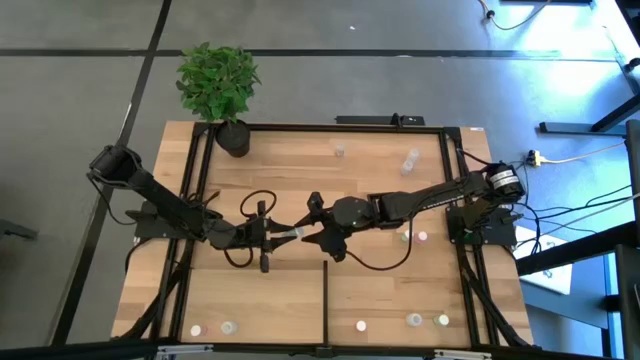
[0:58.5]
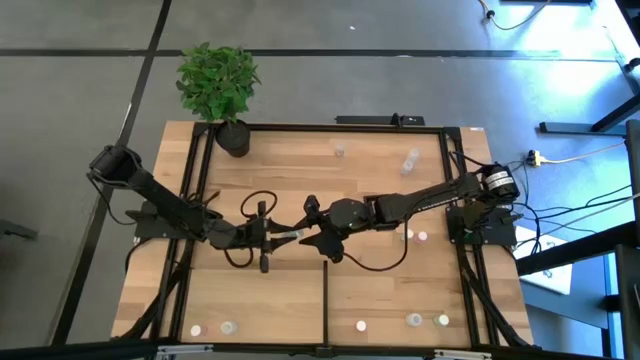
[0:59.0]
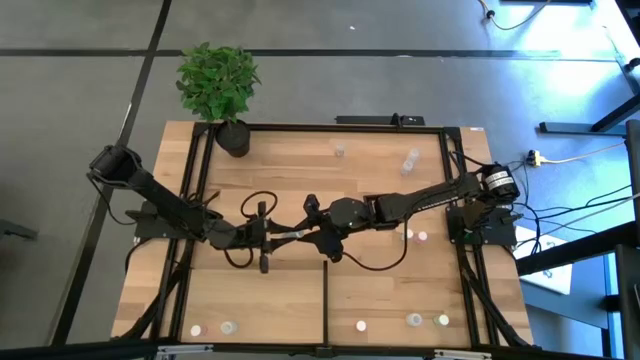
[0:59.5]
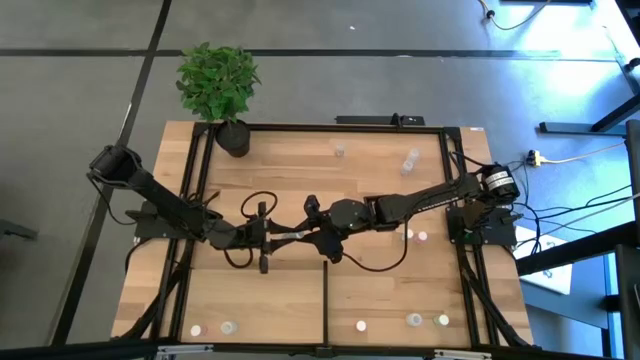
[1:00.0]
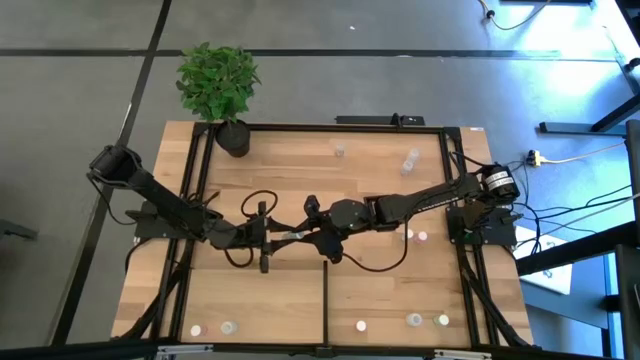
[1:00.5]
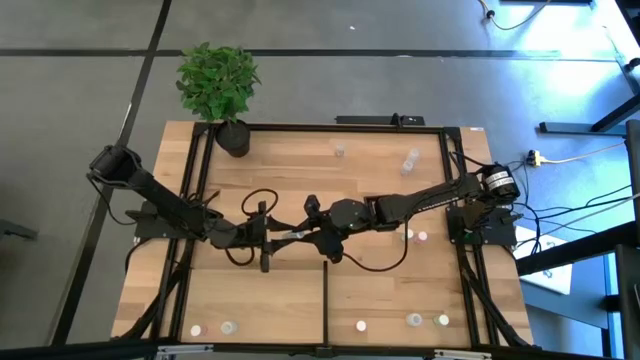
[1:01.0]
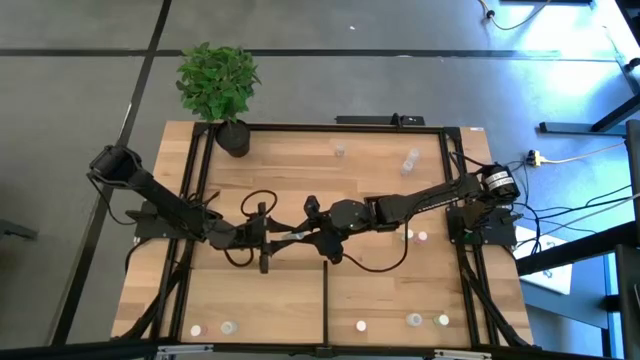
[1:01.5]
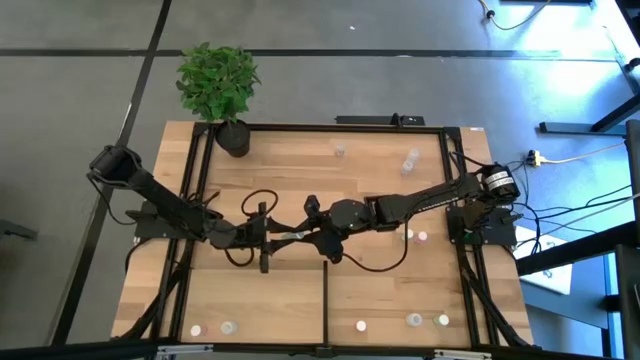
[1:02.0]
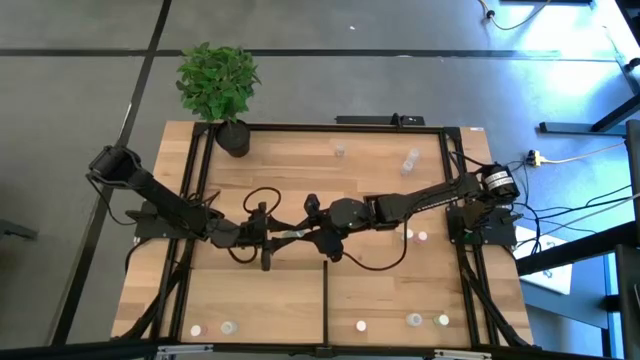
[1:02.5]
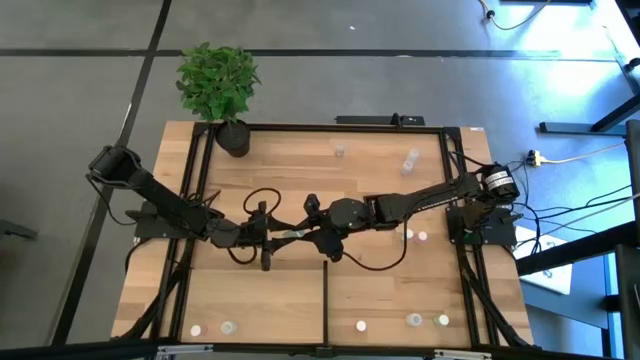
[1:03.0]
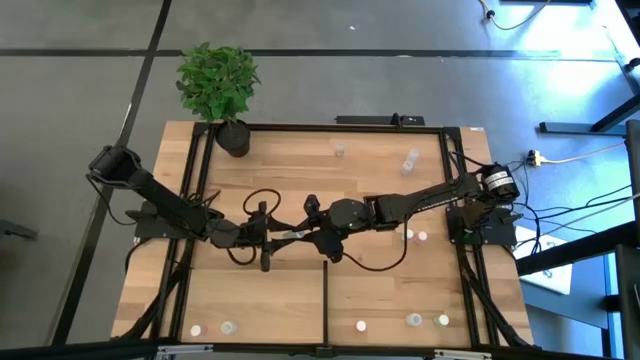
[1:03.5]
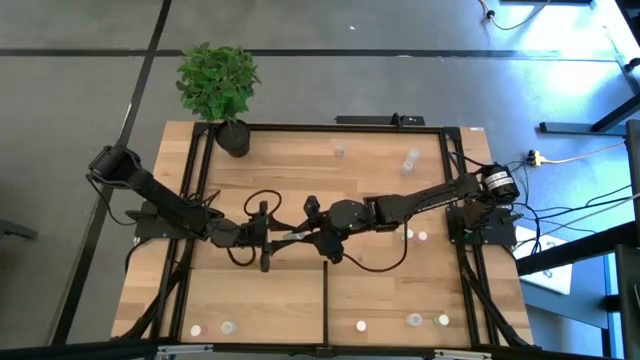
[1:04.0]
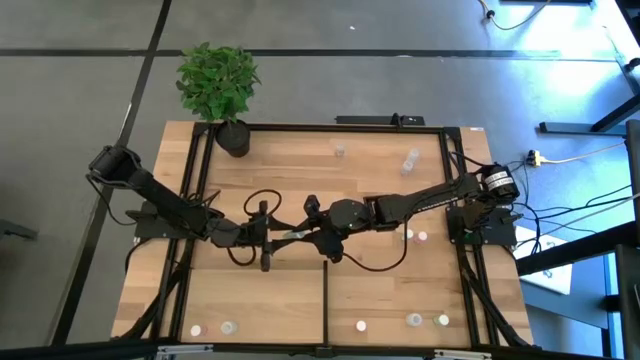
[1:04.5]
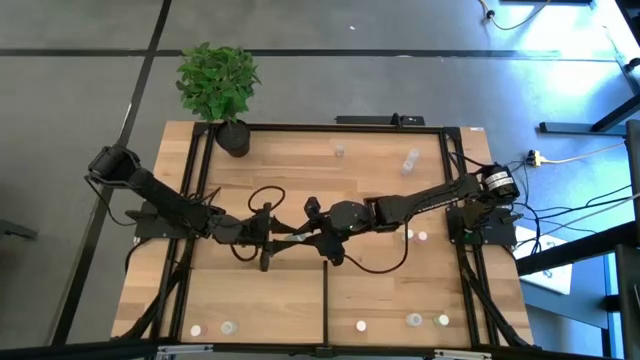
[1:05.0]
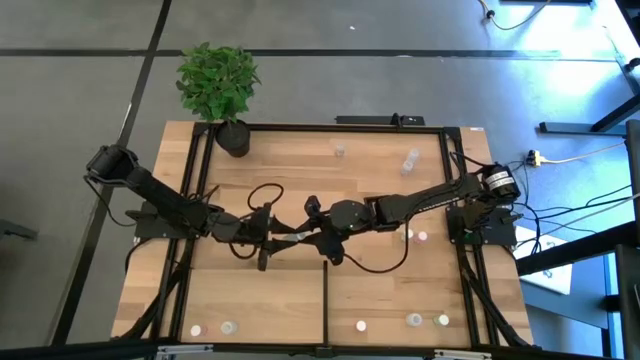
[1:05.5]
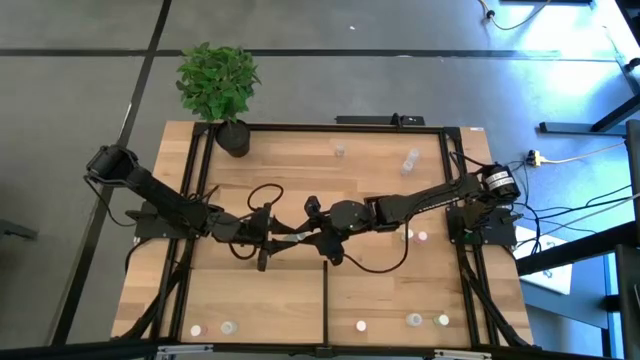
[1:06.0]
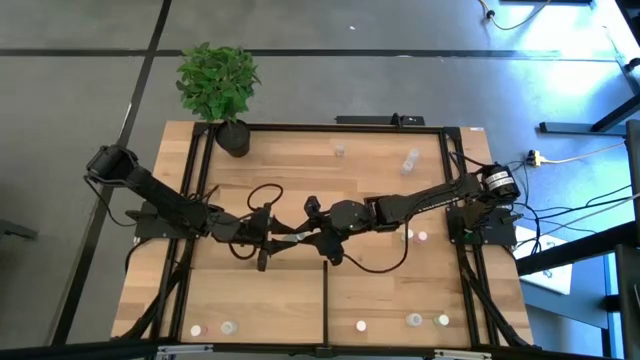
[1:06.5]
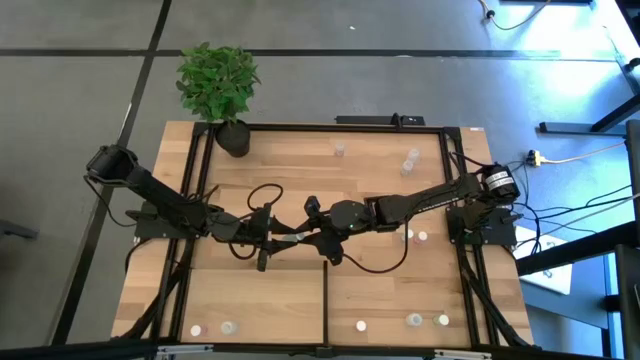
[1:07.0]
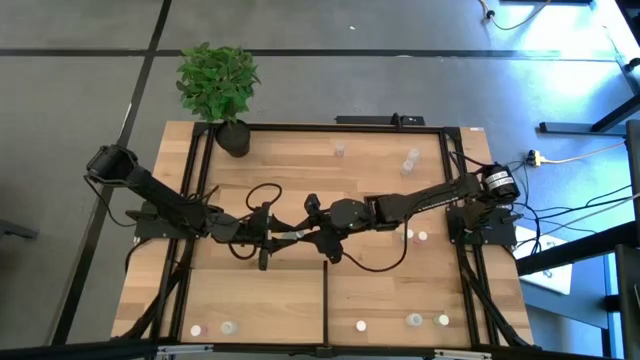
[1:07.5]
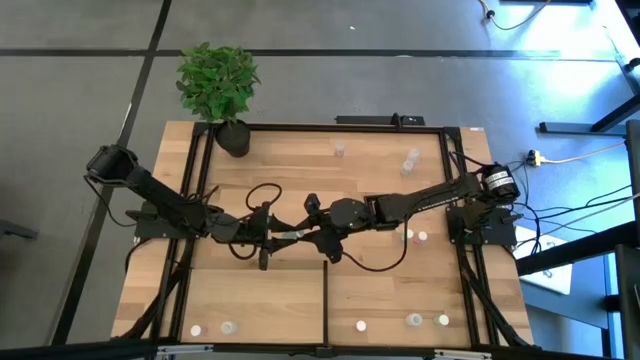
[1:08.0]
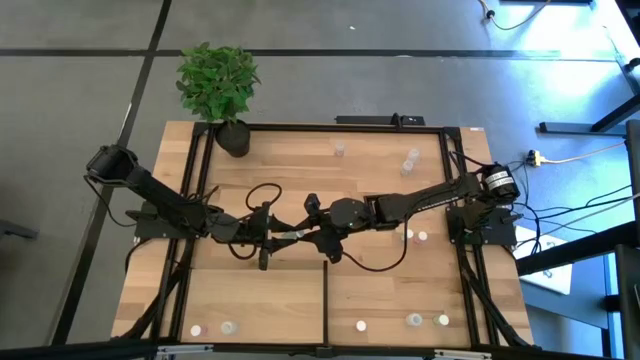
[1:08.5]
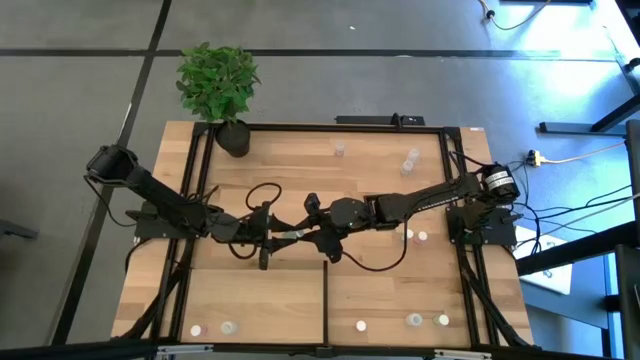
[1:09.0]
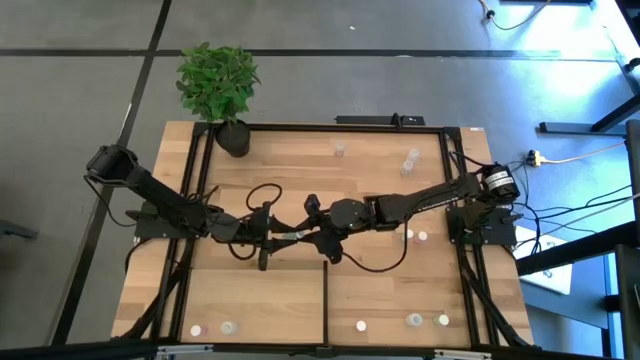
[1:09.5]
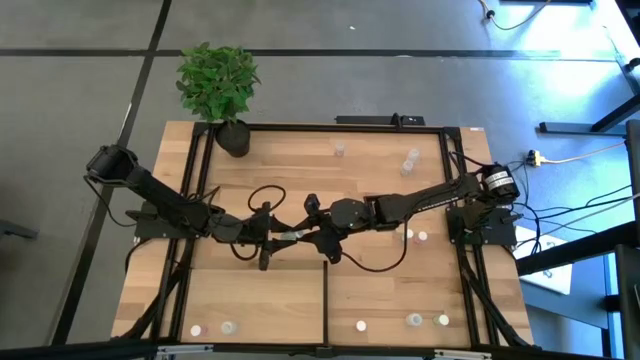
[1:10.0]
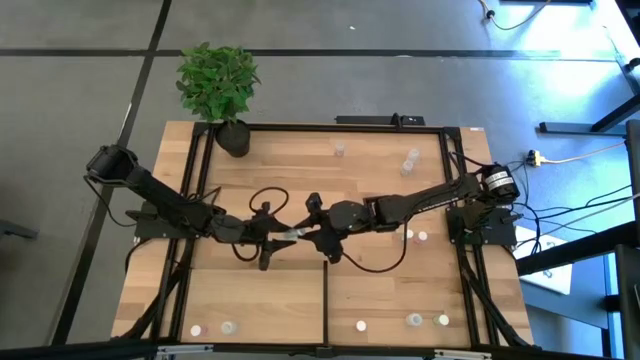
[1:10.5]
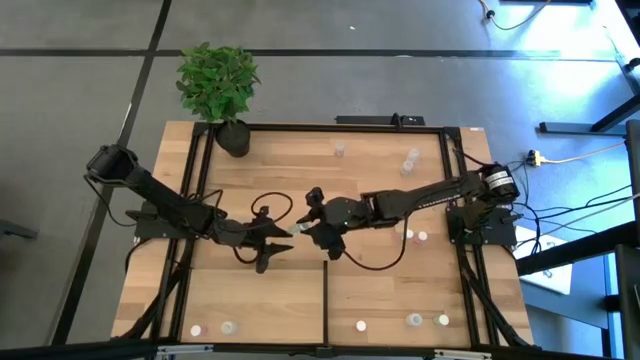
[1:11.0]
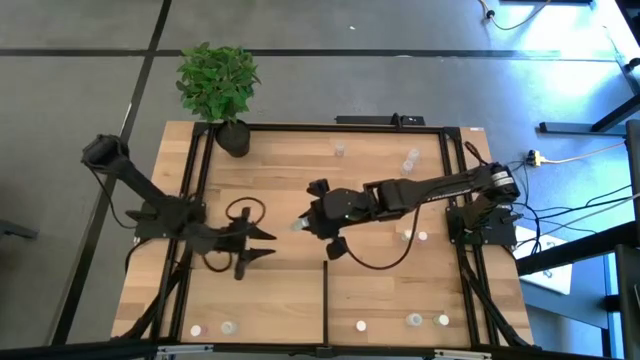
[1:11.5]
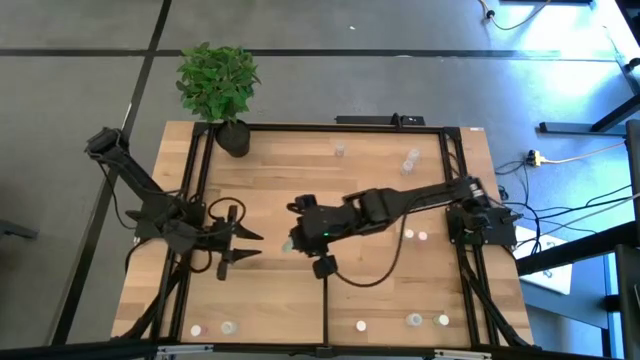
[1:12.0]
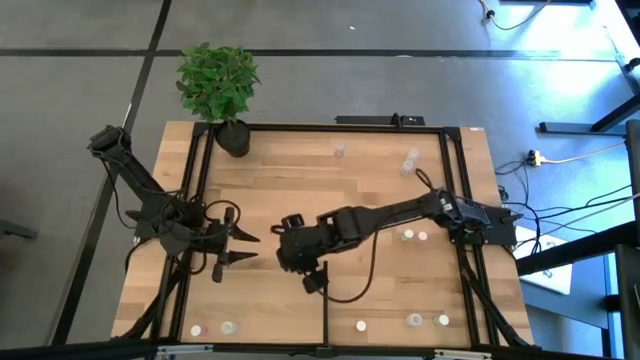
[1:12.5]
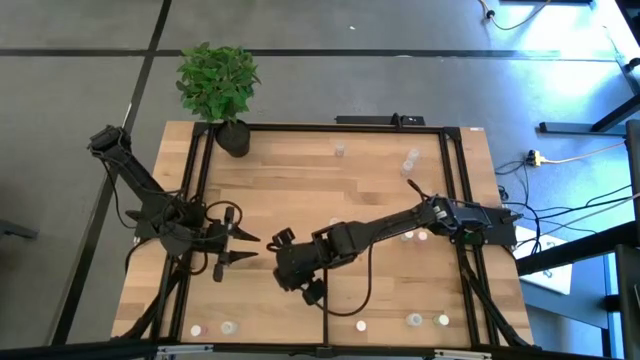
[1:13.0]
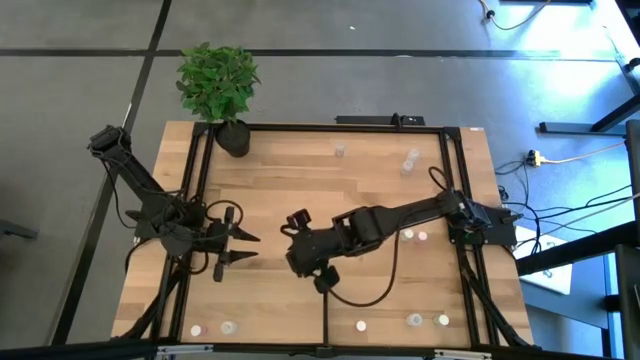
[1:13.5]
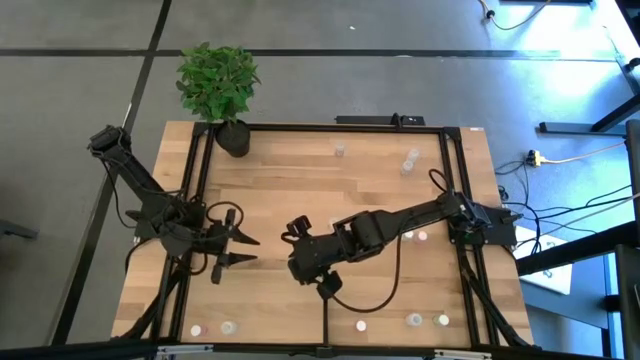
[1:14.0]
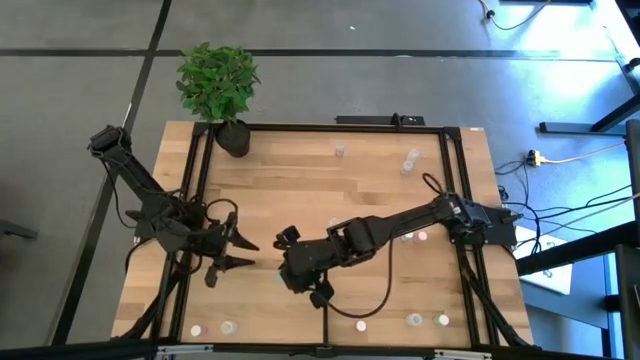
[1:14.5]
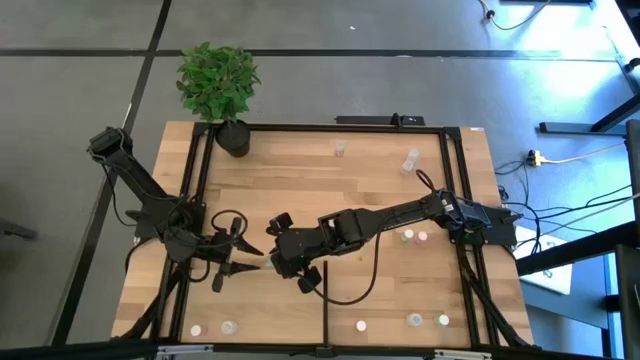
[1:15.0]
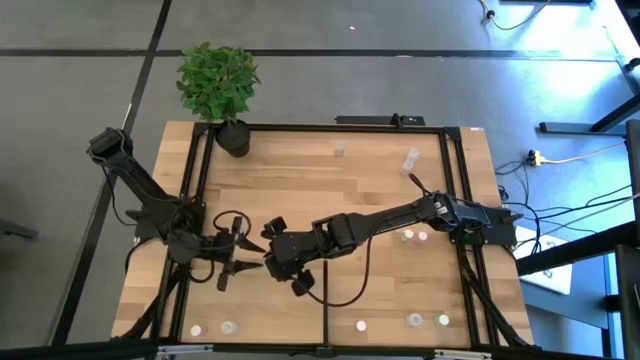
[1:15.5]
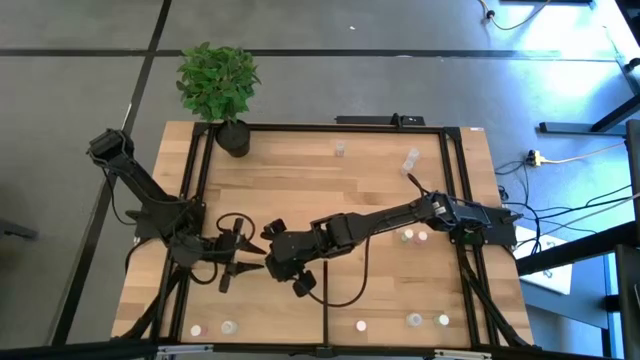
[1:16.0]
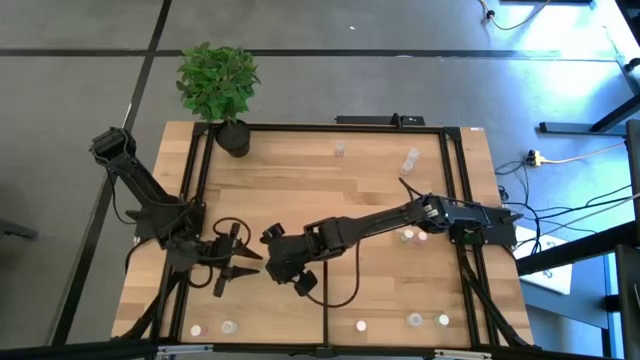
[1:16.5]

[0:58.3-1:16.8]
Task: Pick and place medicine bottles onto shelf by color
Put the top left green pill bottle on the shelf

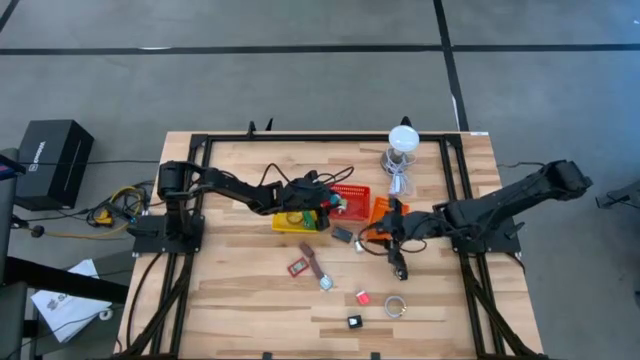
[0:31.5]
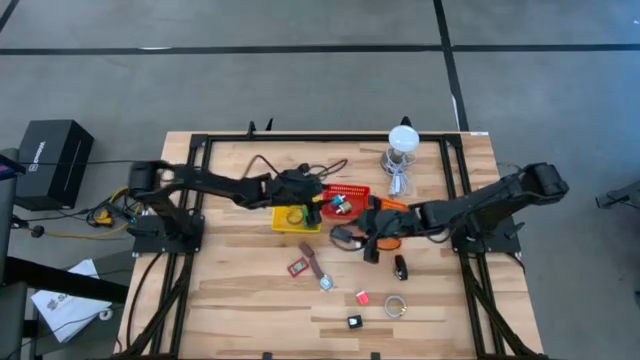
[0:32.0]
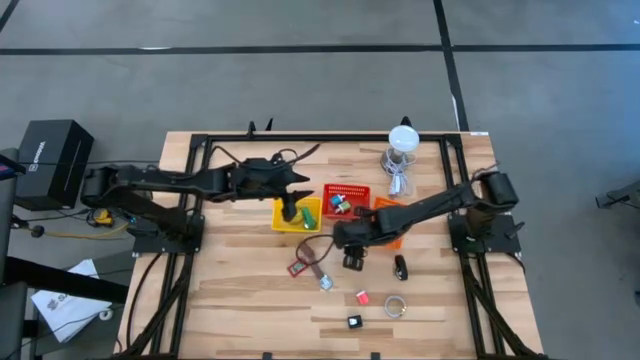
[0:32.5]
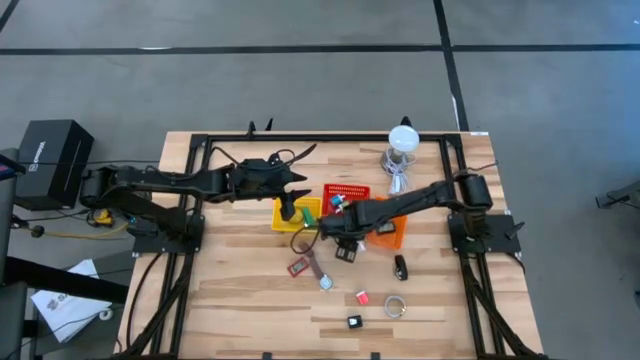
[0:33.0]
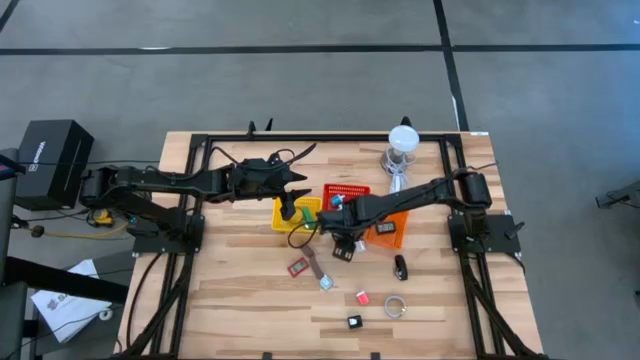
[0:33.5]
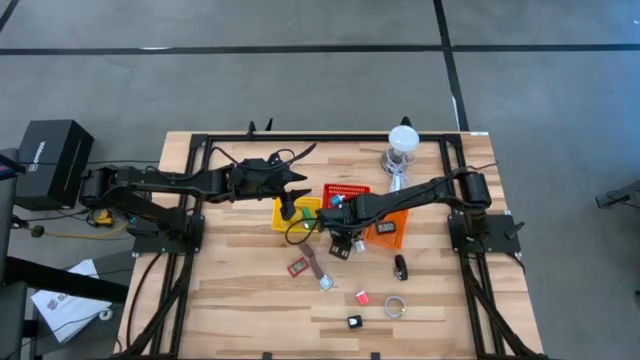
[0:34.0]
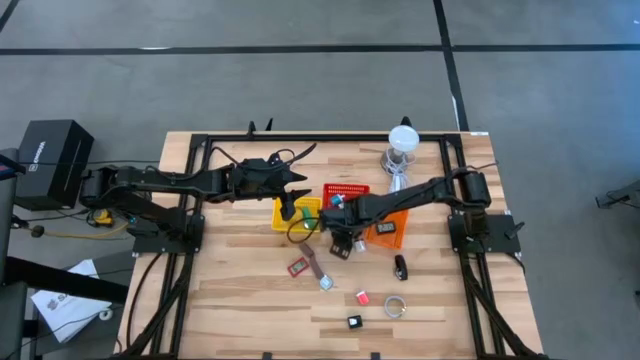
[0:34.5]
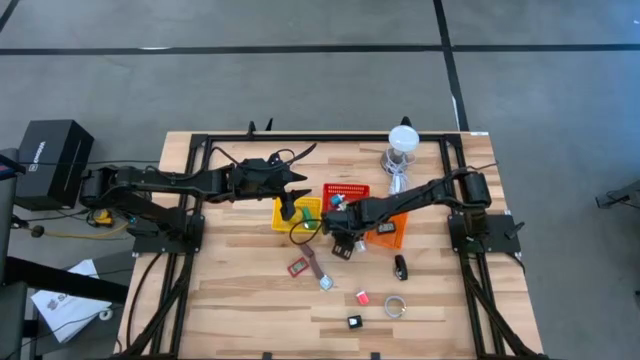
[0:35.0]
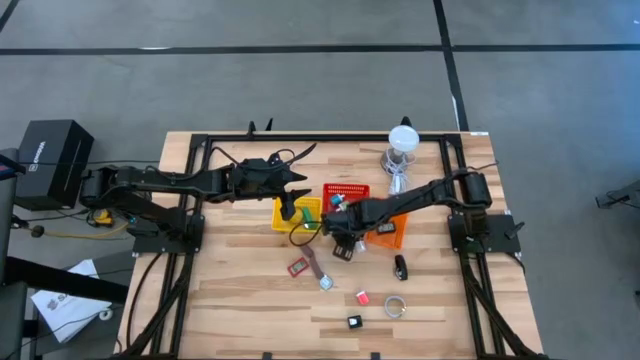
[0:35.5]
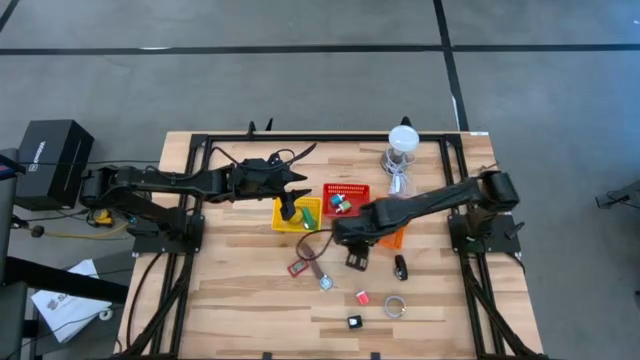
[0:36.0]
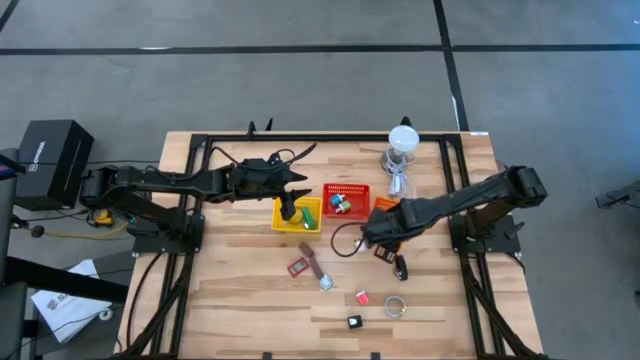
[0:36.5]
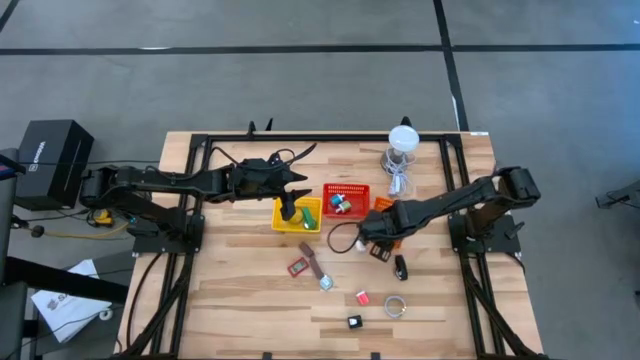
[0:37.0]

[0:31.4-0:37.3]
Task: Pick & Place Office items
Put the black digital clock into the orange bin
